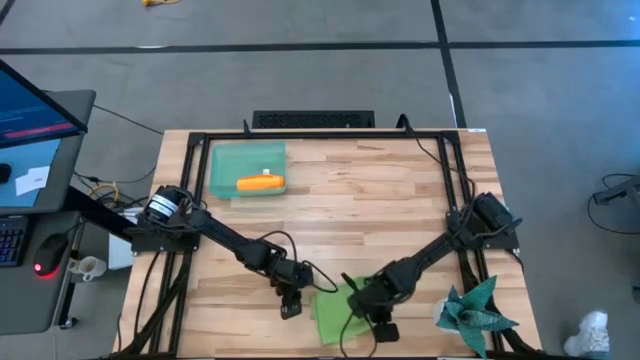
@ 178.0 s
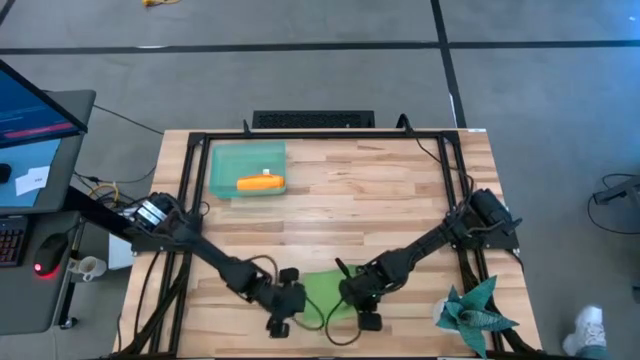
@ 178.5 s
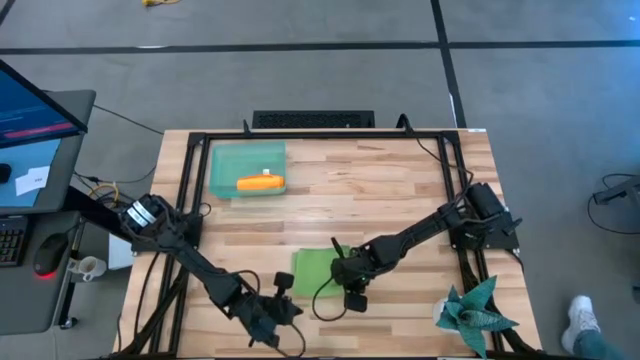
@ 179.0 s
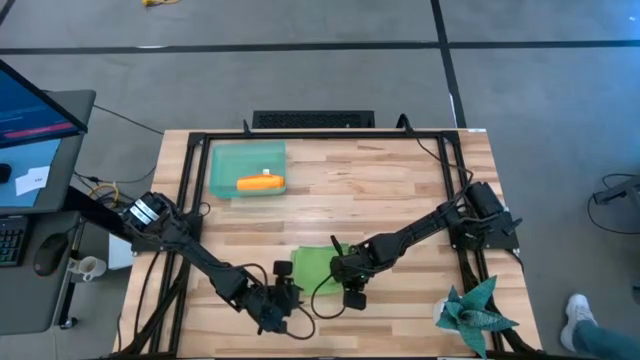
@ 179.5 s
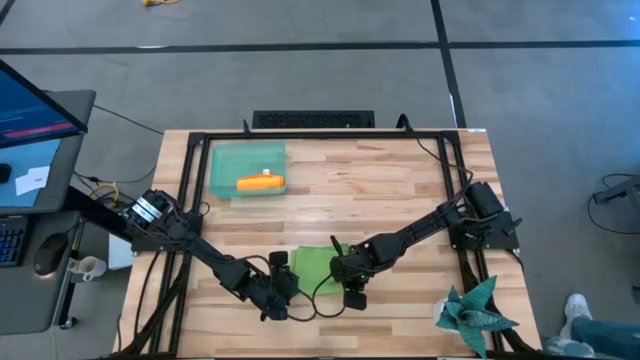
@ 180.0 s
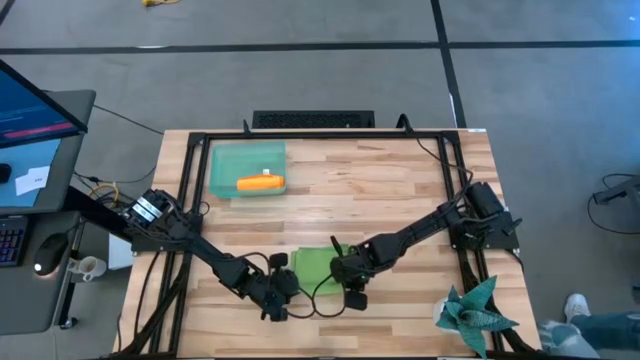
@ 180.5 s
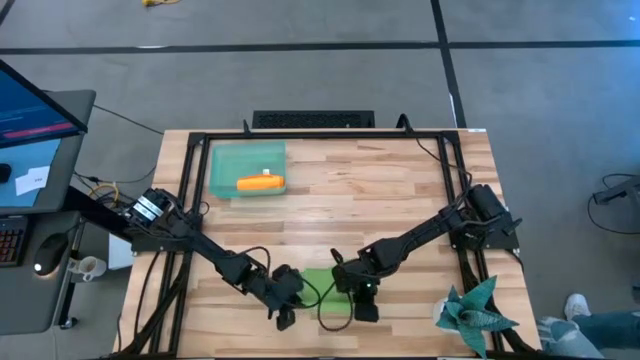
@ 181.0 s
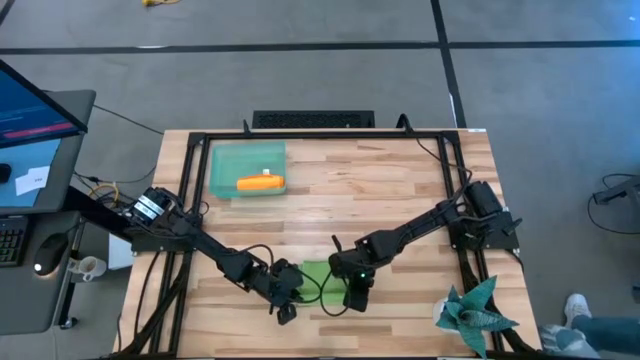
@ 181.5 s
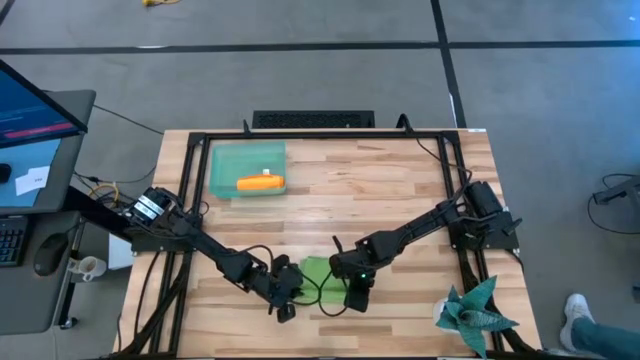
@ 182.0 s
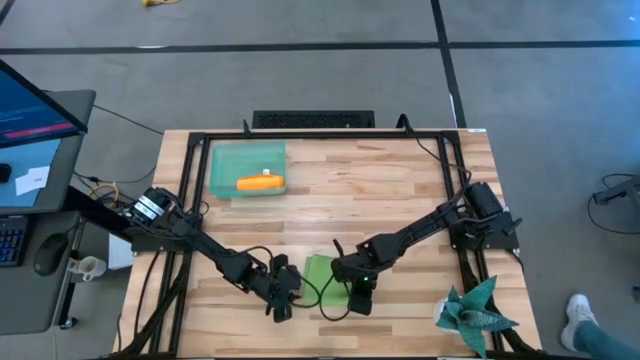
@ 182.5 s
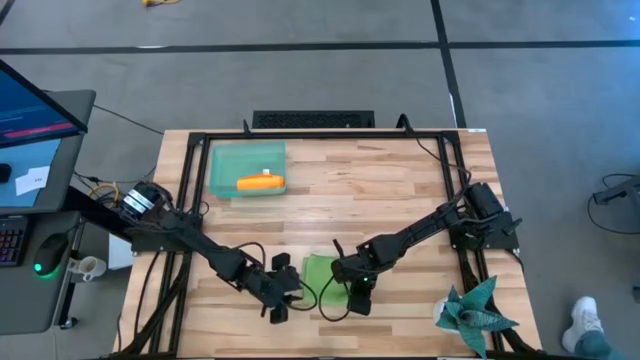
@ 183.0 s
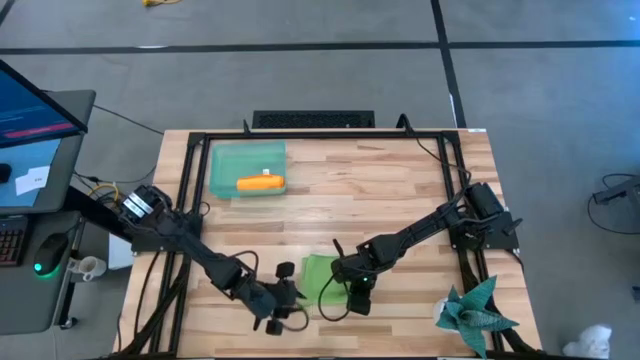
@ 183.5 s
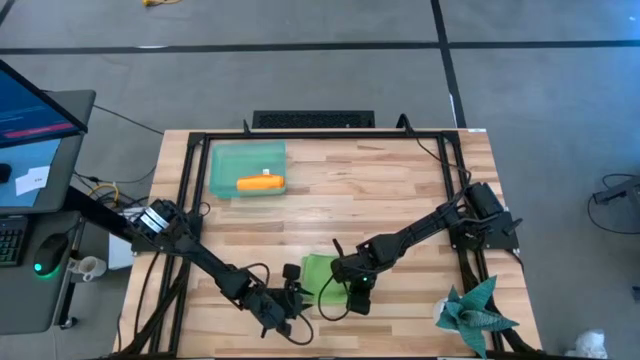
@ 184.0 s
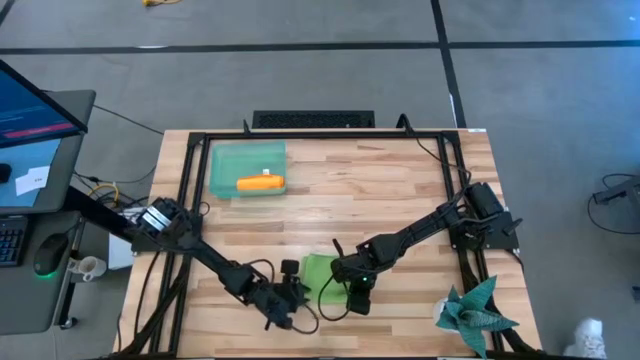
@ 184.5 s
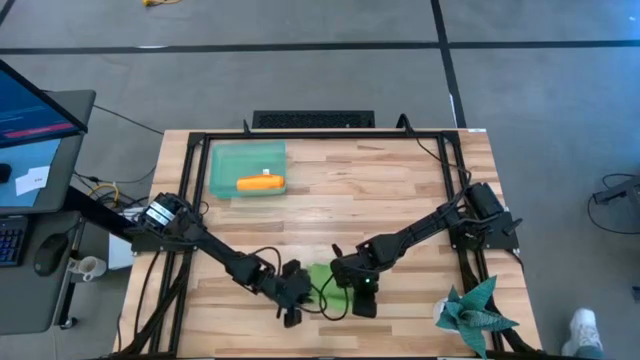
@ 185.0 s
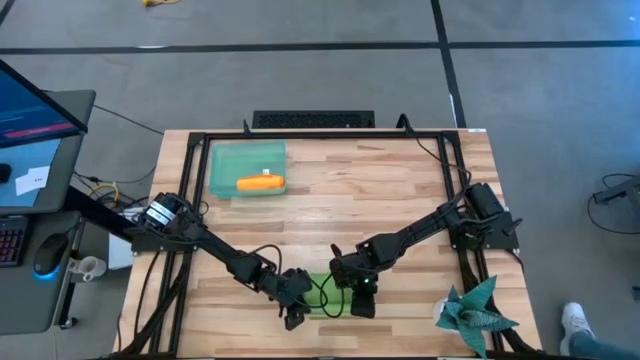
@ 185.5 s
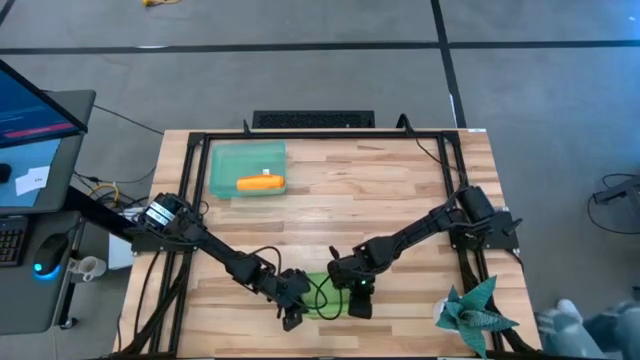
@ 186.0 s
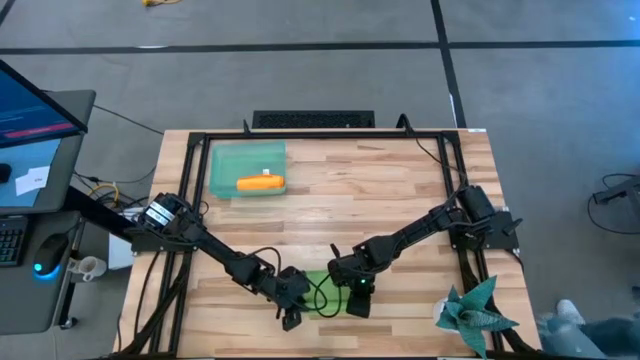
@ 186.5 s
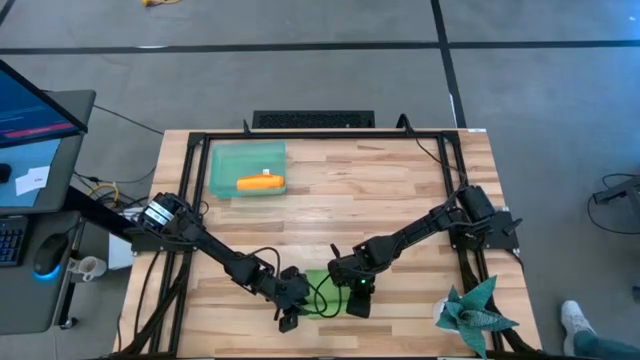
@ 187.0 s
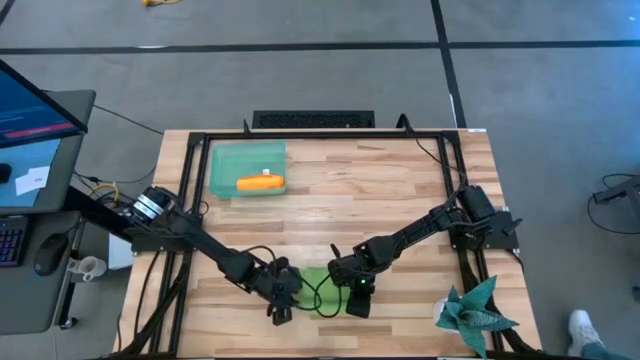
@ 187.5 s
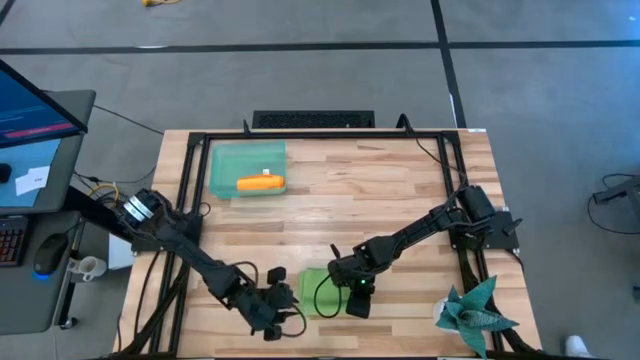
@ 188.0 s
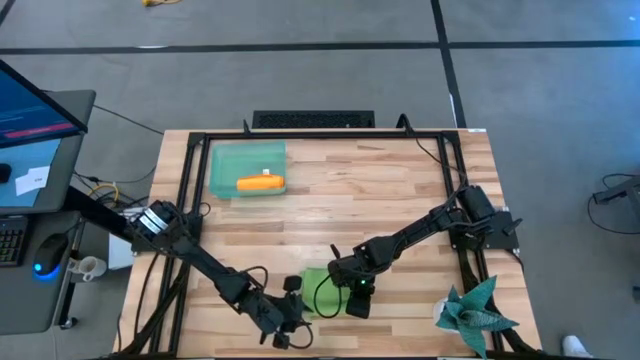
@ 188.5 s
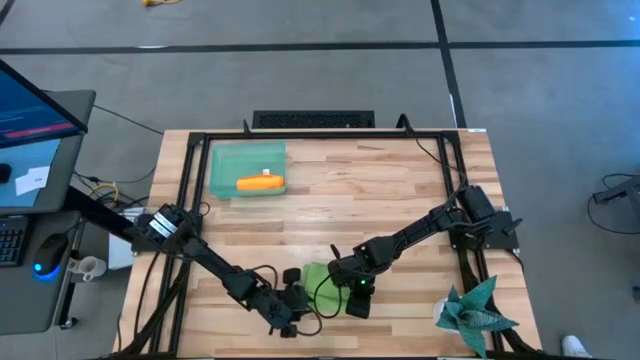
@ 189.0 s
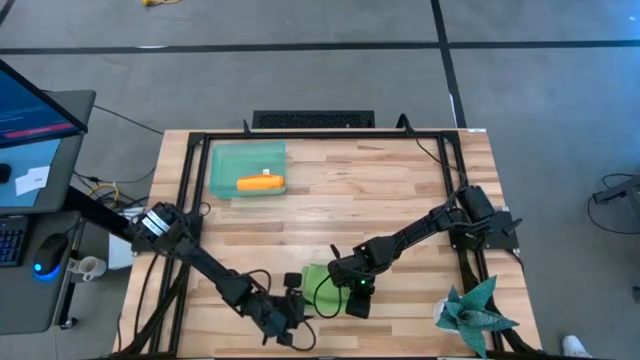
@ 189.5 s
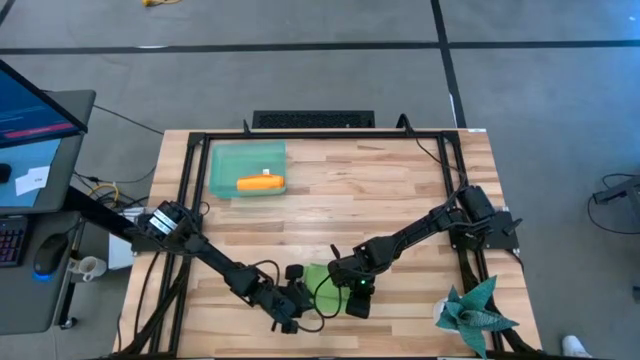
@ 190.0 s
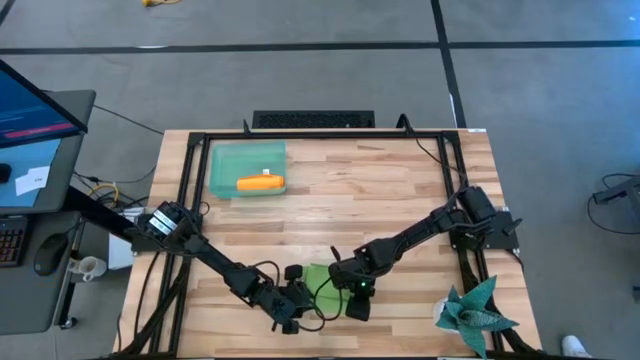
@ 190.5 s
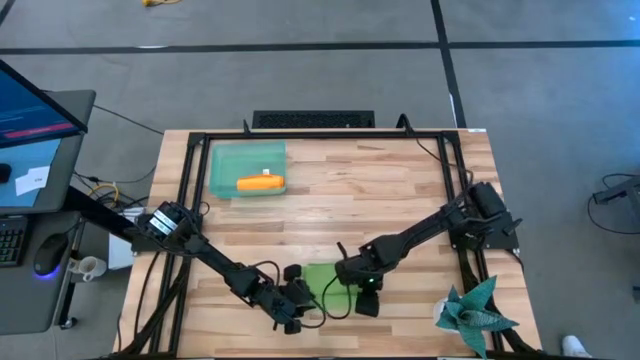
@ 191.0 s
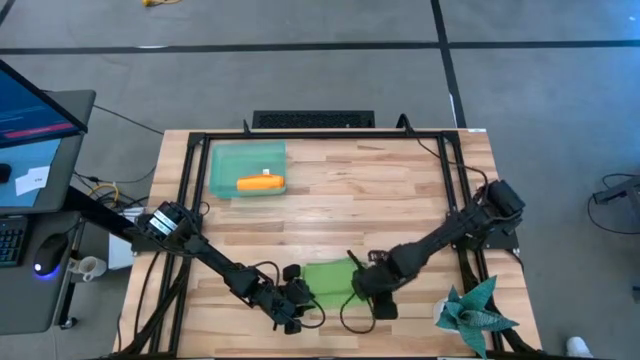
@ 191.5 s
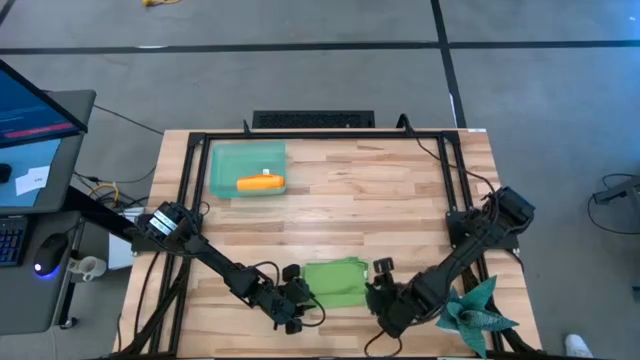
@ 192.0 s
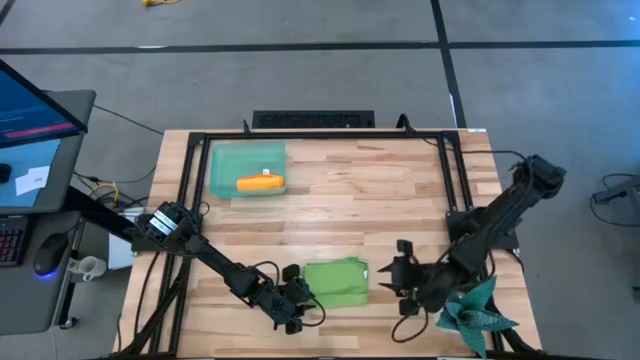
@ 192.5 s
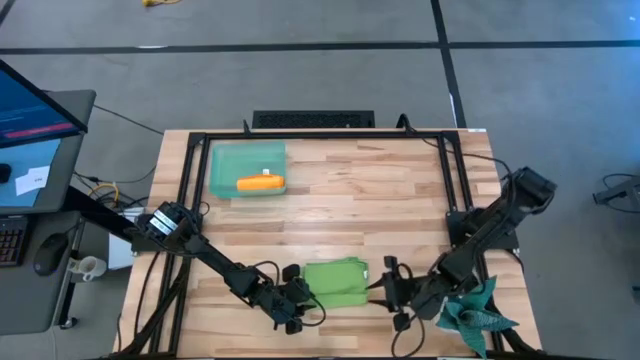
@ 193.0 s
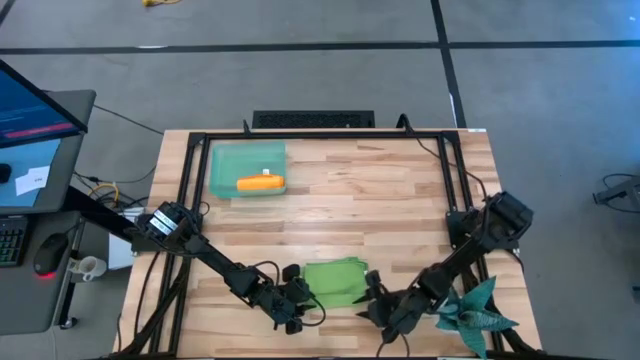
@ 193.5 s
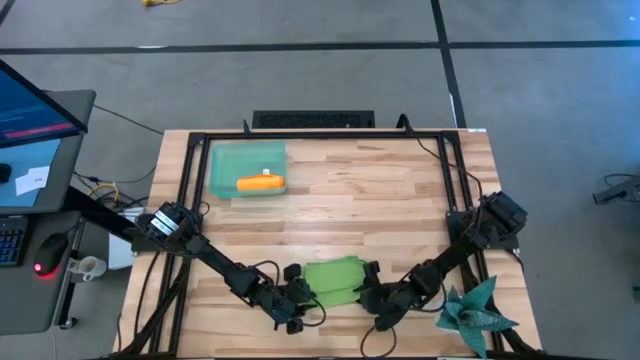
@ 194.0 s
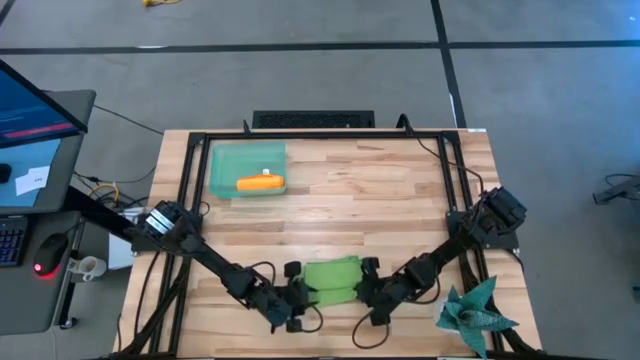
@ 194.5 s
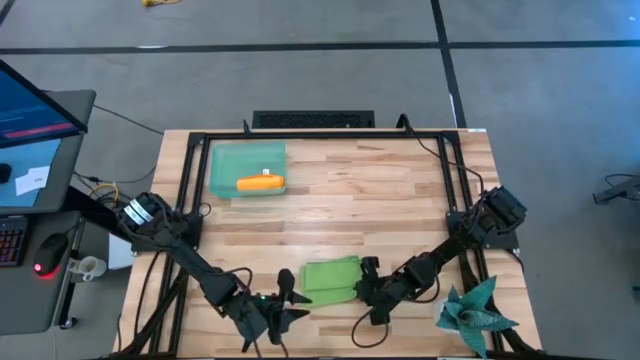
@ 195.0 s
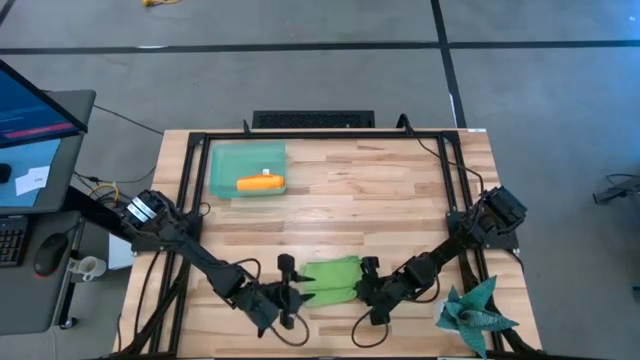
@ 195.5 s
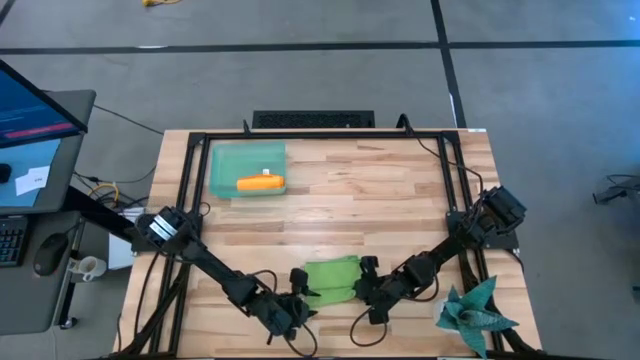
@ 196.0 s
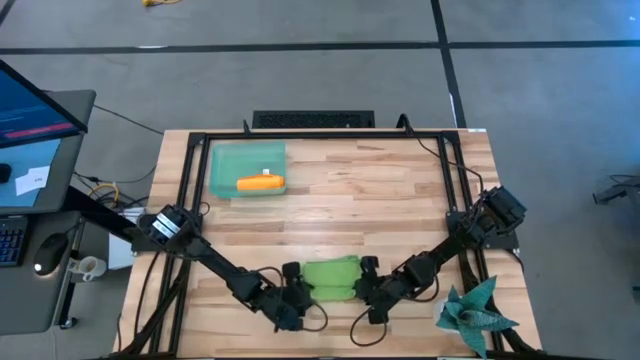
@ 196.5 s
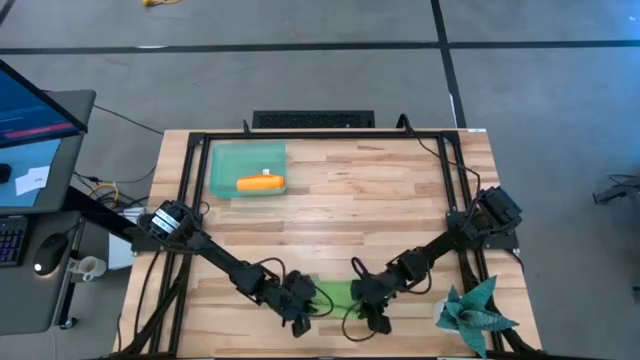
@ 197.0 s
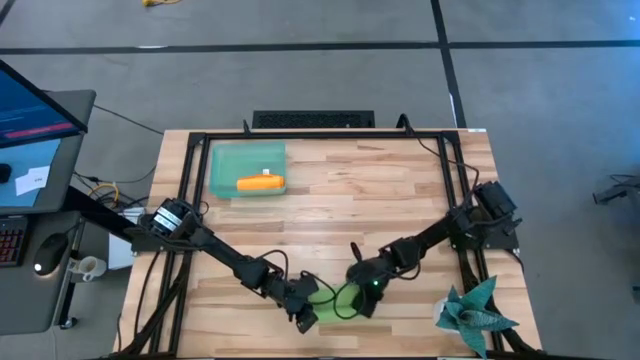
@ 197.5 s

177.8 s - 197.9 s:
Task: Roll microfiber towels into tight, uniform cylinder then place into a basket
Roll the green microfiber cloth

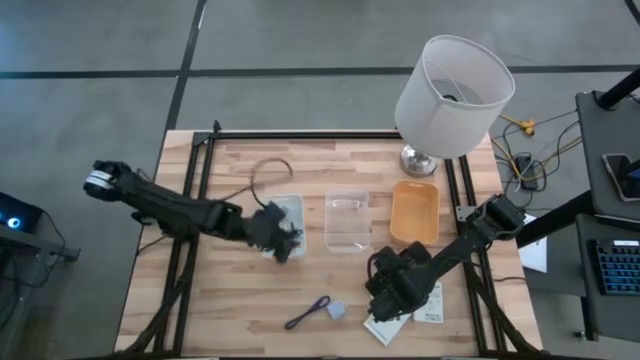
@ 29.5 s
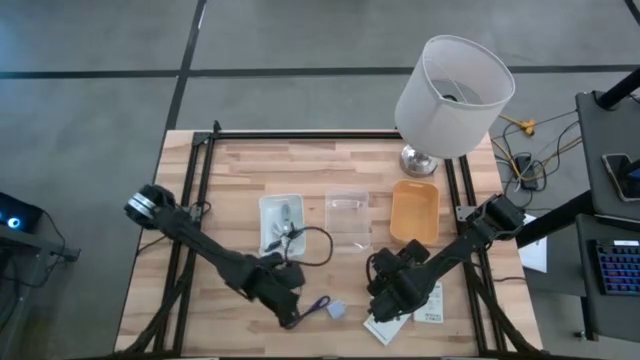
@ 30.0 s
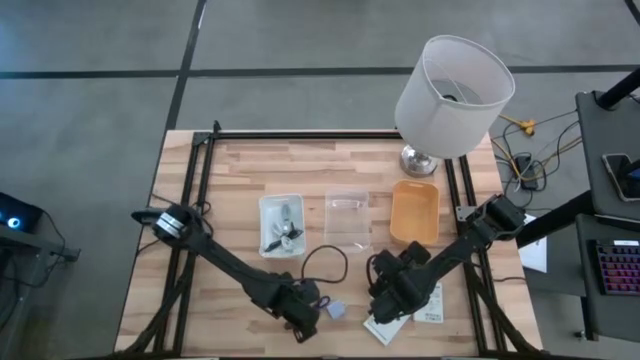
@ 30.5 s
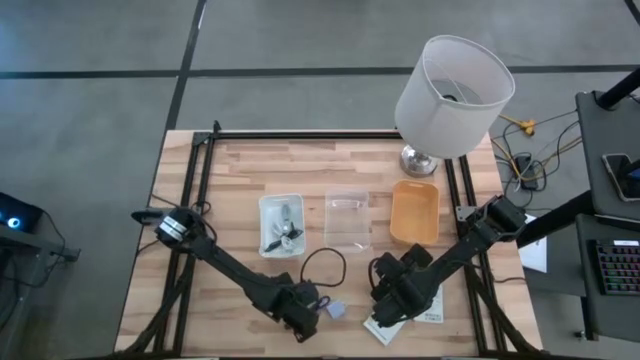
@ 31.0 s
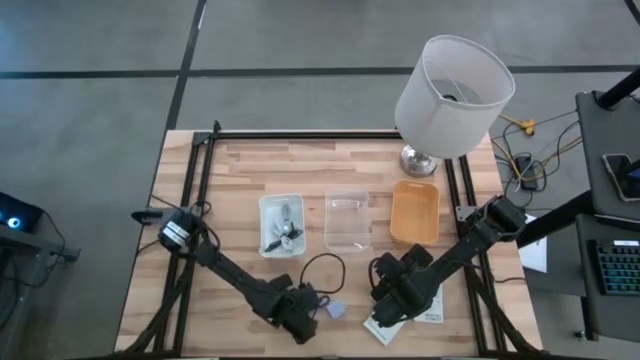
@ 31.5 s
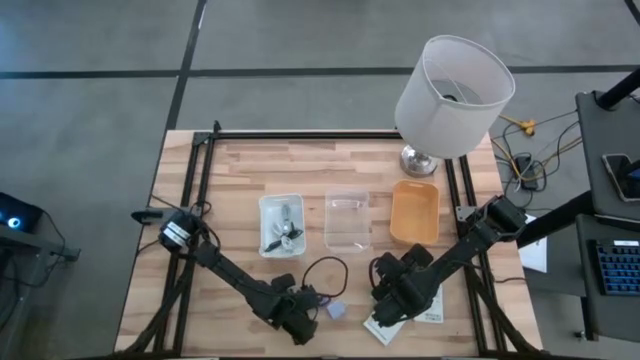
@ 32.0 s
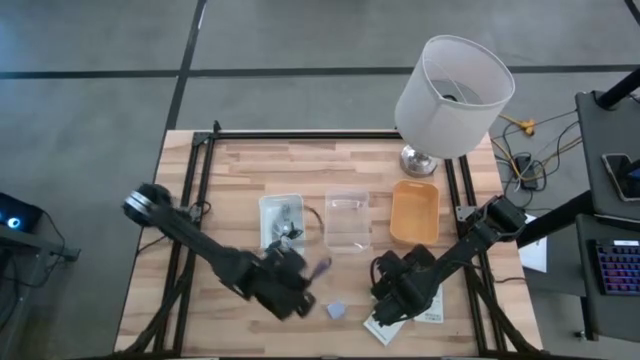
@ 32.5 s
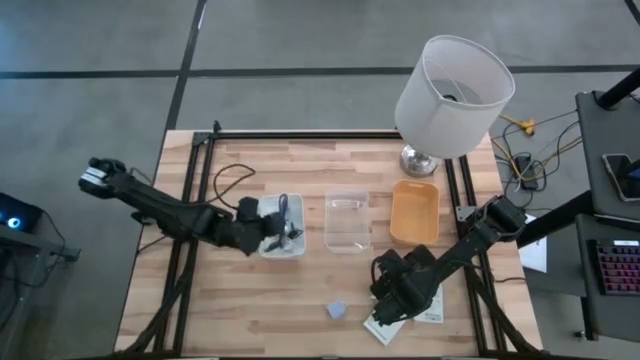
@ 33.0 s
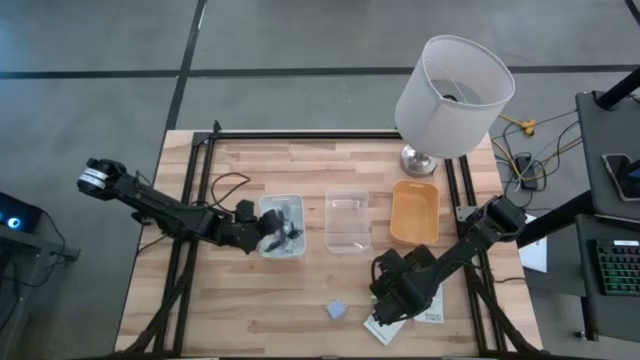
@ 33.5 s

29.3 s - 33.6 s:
Task: Pick and place items into bin
Put the blue charger cable into the white bin
